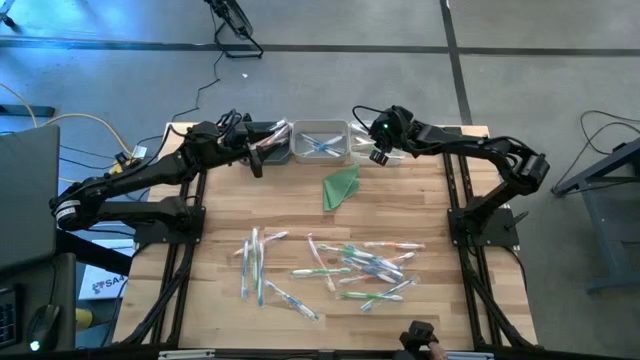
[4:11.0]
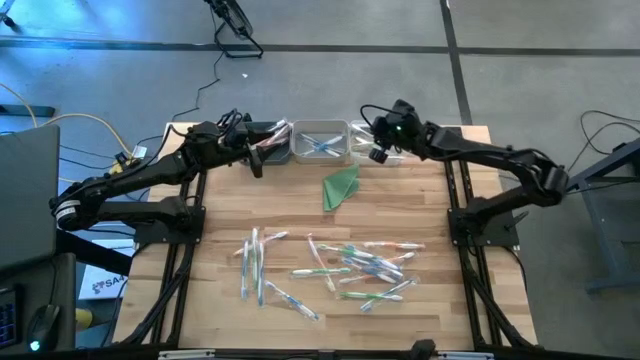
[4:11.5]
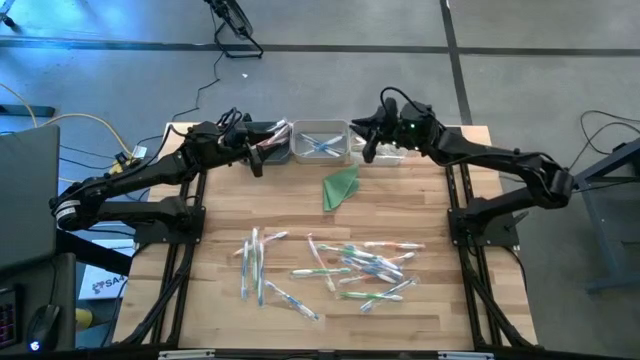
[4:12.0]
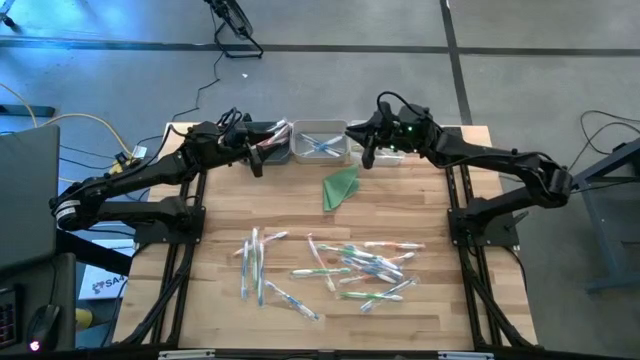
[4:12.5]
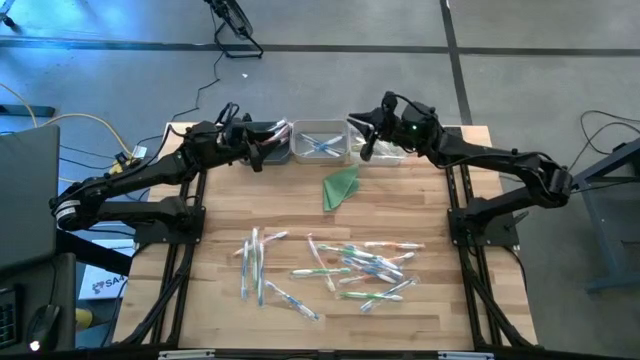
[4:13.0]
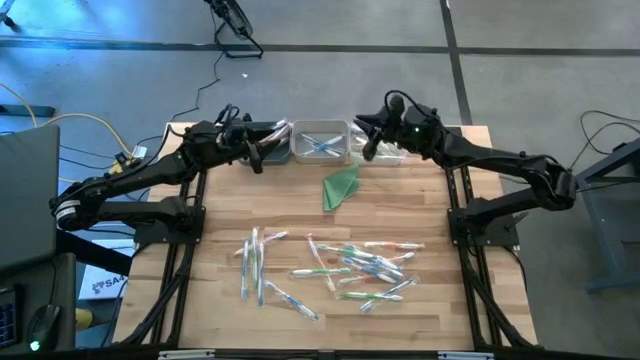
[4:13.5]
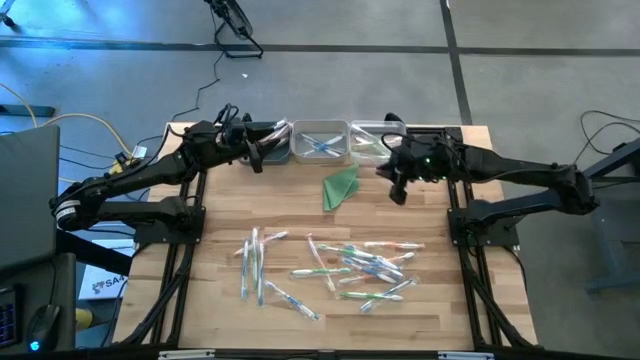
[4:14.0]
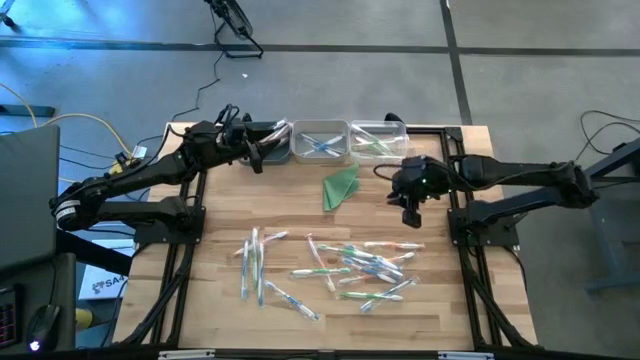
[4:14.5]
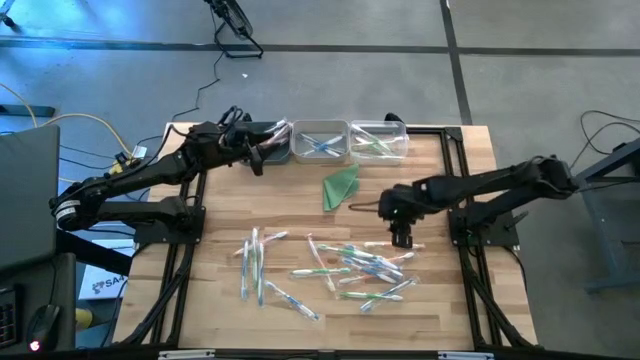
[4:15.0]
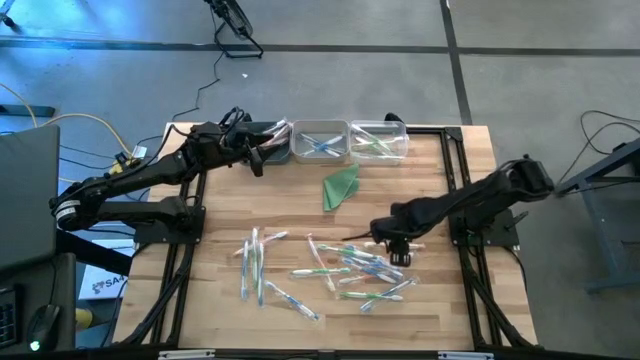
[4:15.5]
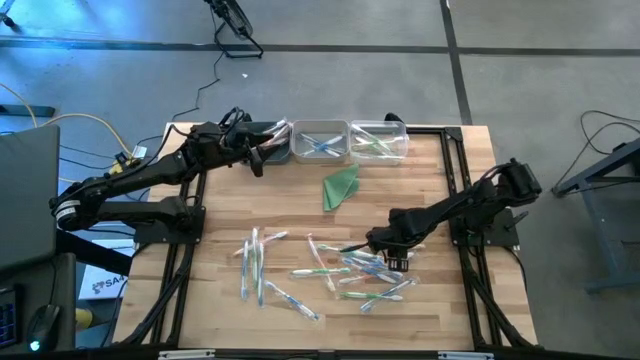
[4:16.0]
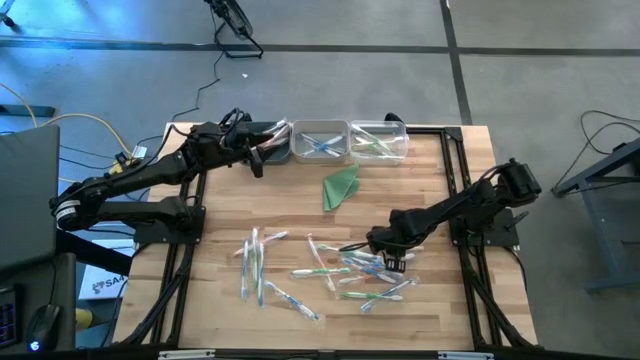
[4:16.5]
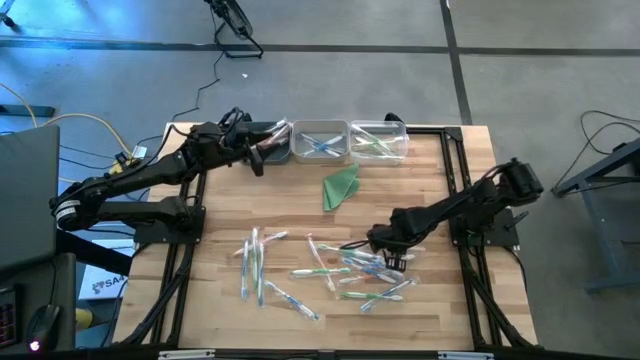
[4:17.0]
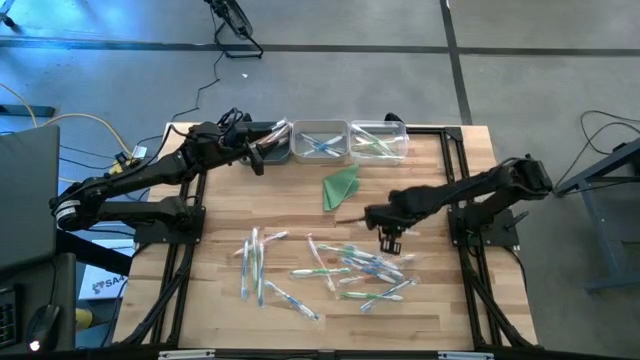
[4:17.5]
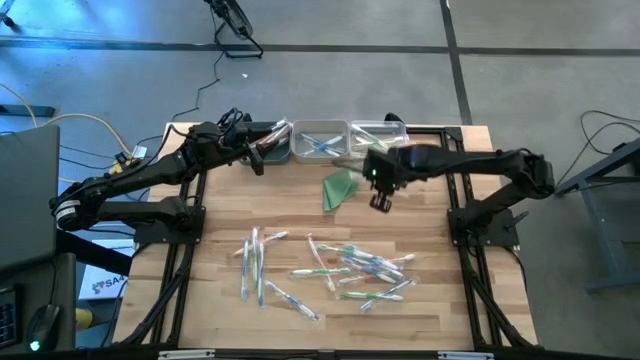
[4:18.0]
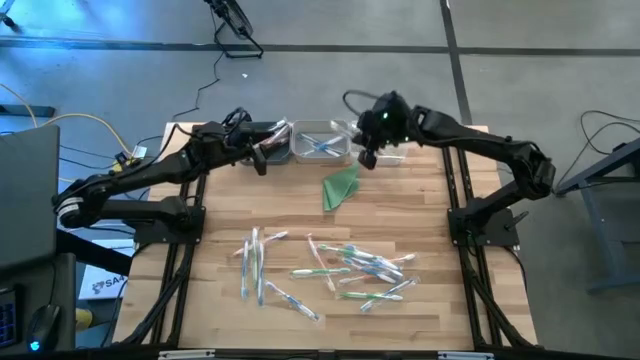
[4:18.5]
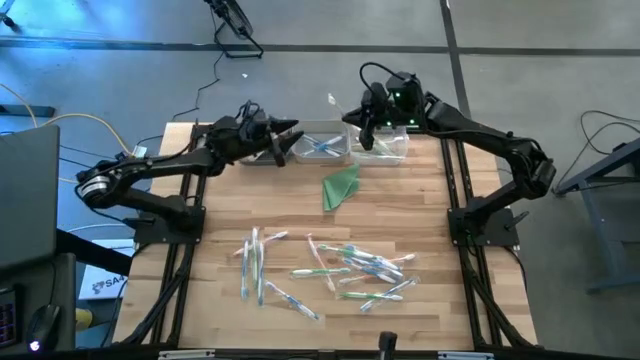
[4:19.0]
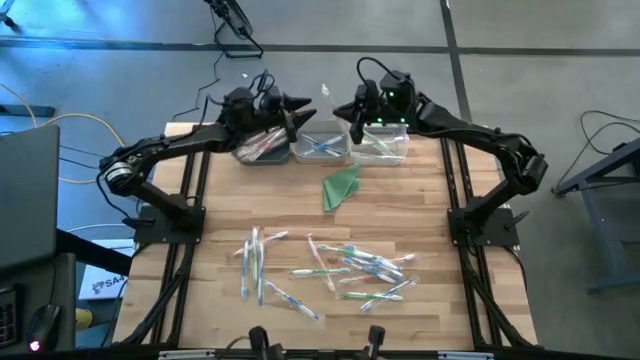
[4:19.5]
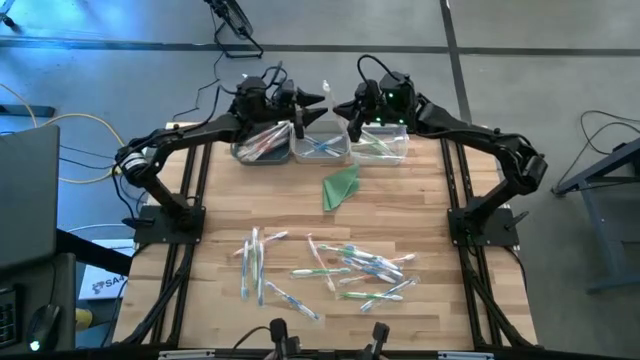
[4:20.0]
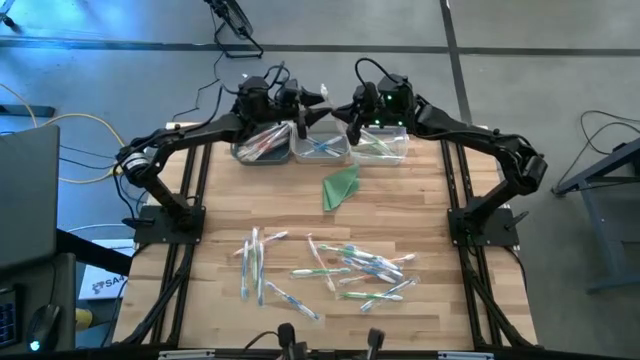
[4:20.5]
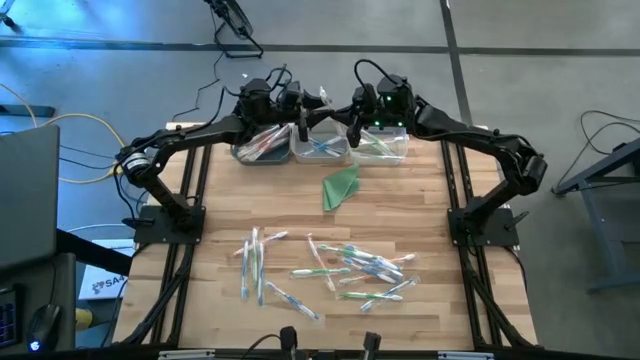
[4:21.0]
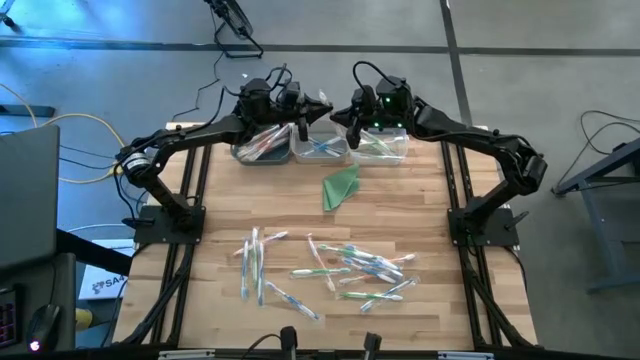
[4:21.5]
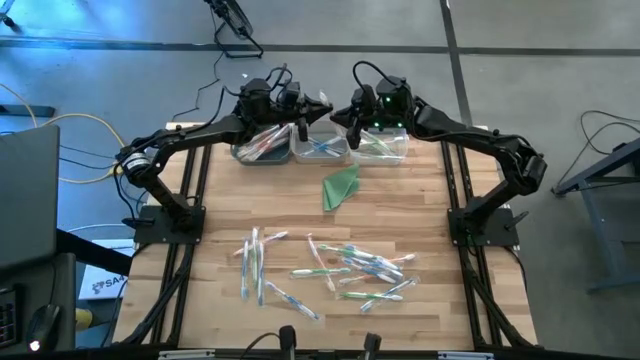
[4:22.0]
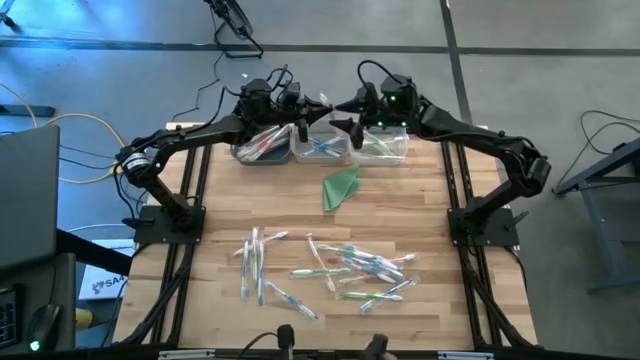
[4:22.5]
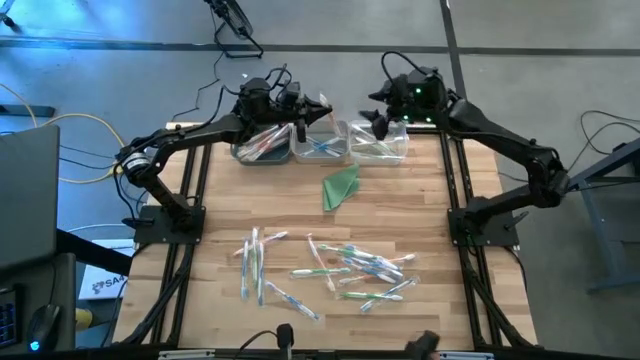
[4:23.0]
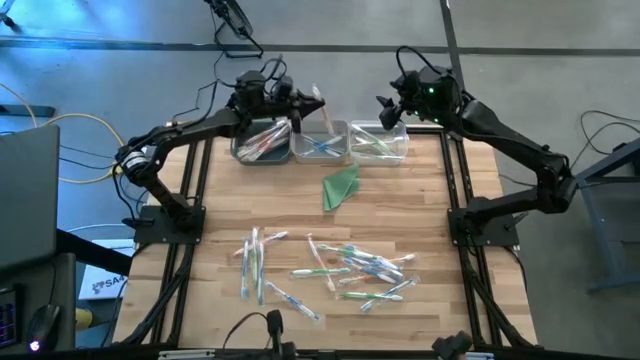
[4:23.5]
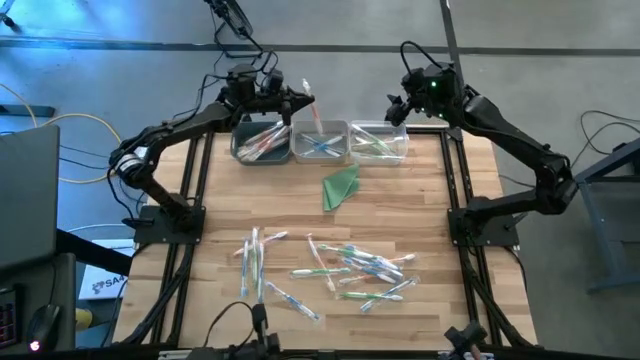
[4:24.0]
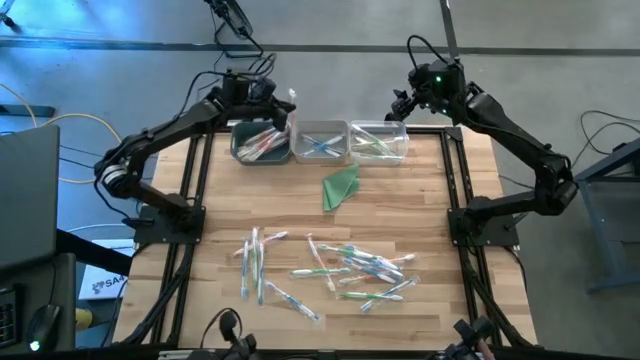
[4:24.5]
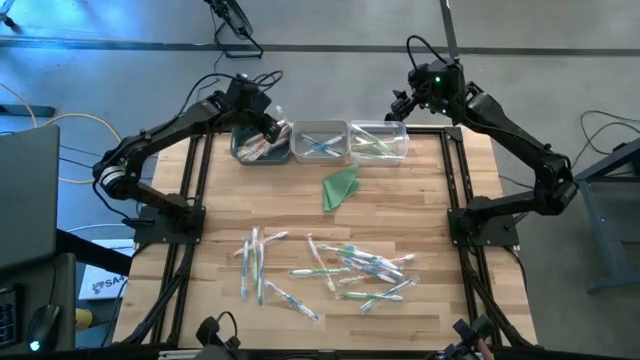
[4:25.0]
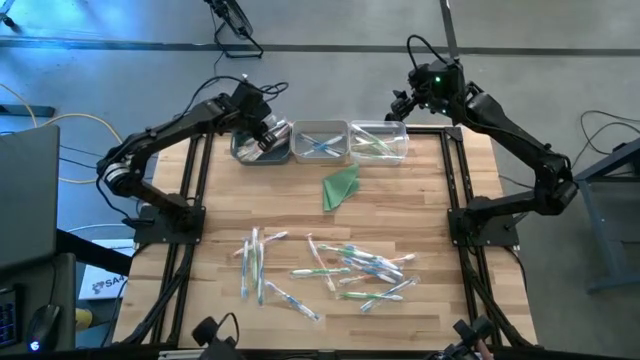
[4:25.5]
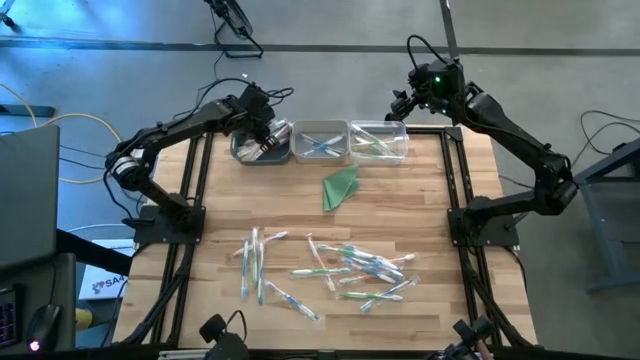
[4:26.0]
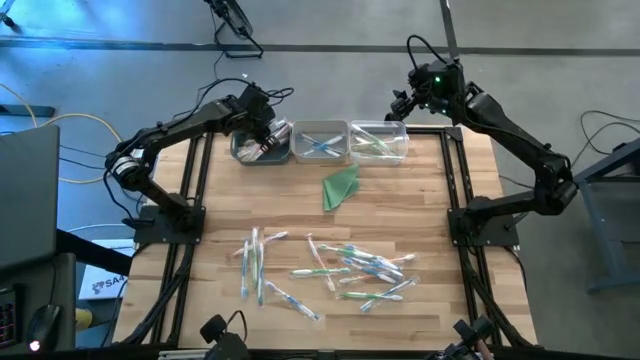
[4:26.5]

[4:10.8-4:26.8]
Task: Pick & Place Toothbrushes
Put the orange toothbrush into the dark blue bin

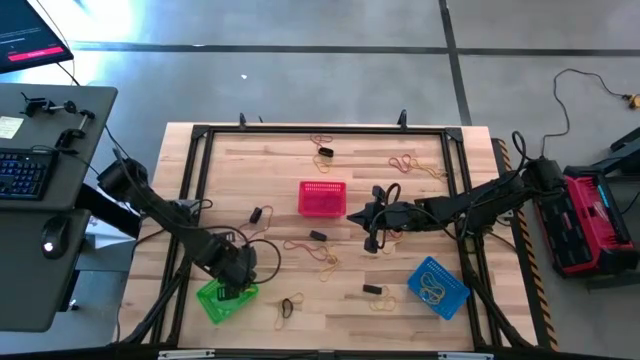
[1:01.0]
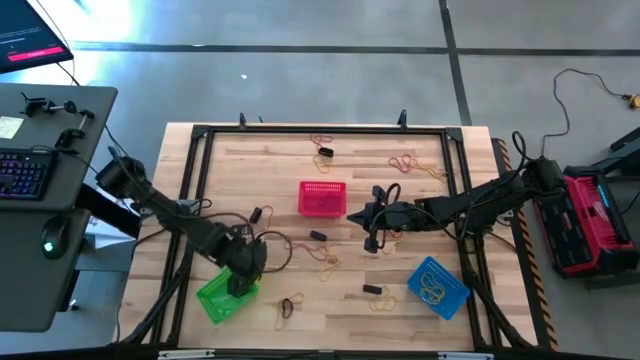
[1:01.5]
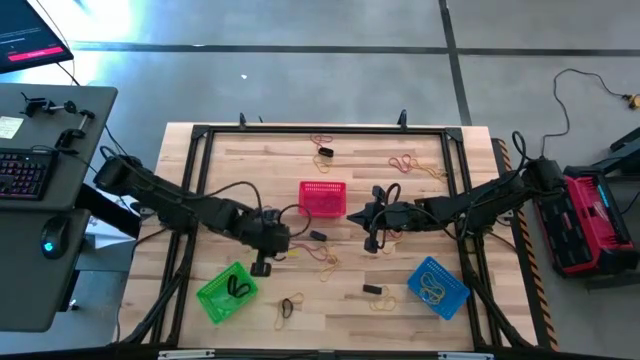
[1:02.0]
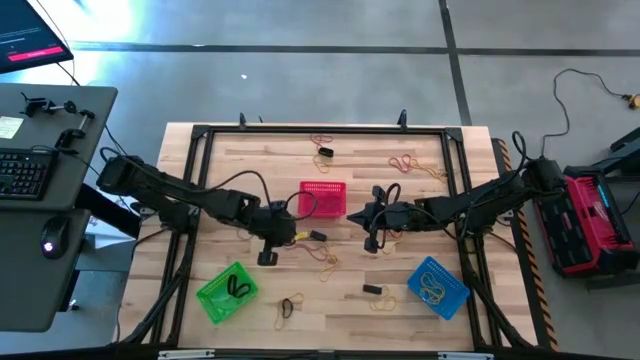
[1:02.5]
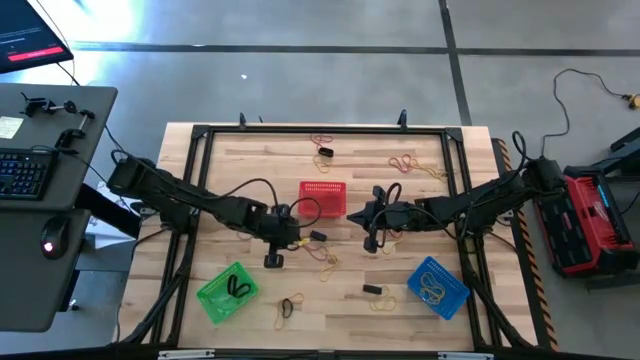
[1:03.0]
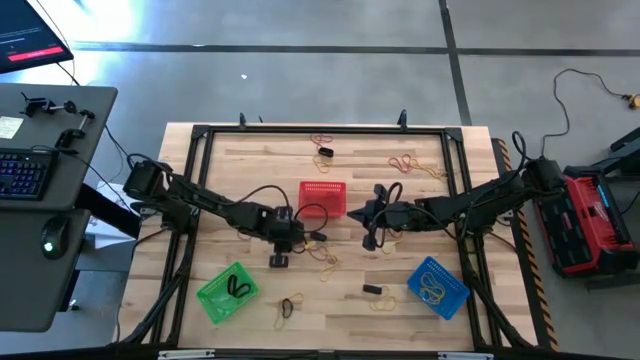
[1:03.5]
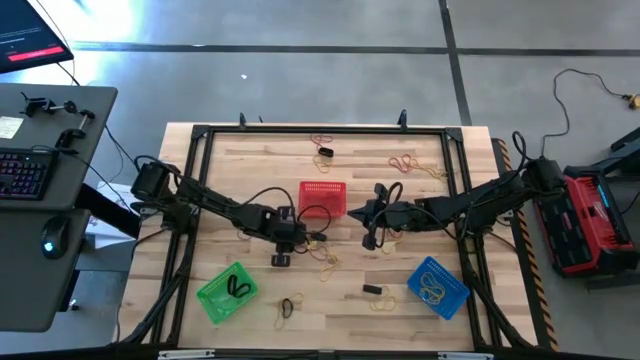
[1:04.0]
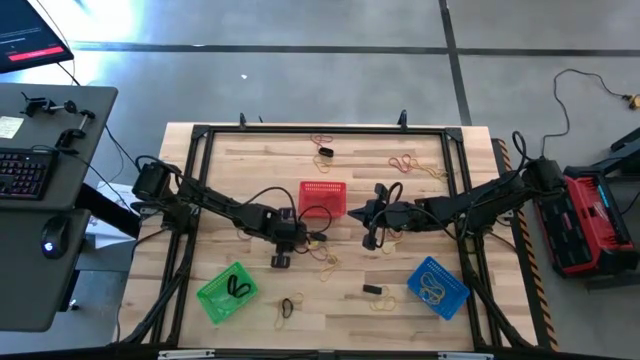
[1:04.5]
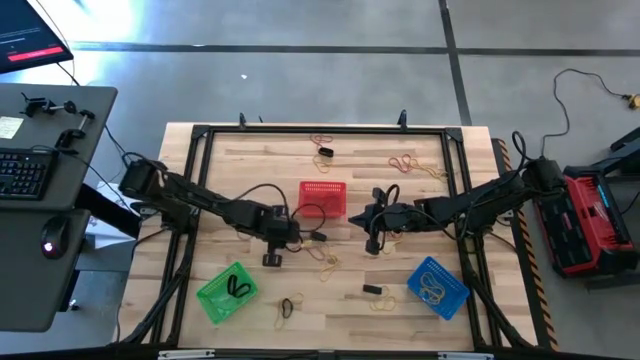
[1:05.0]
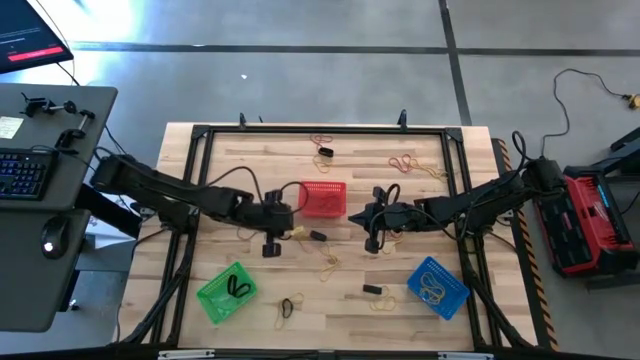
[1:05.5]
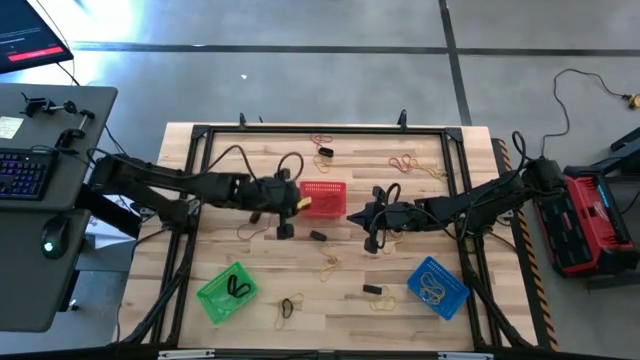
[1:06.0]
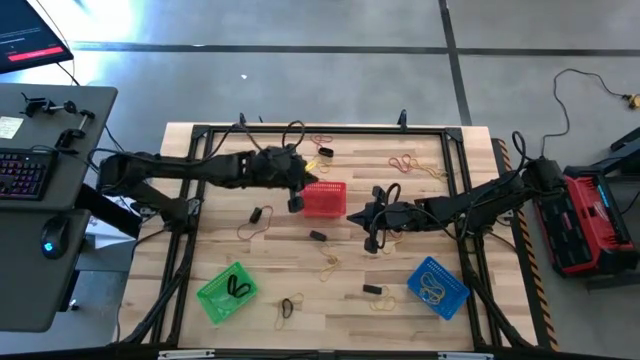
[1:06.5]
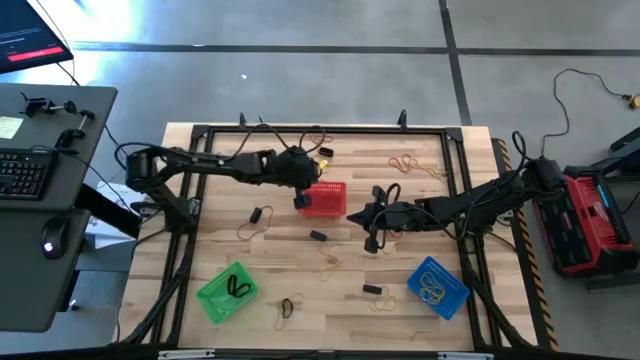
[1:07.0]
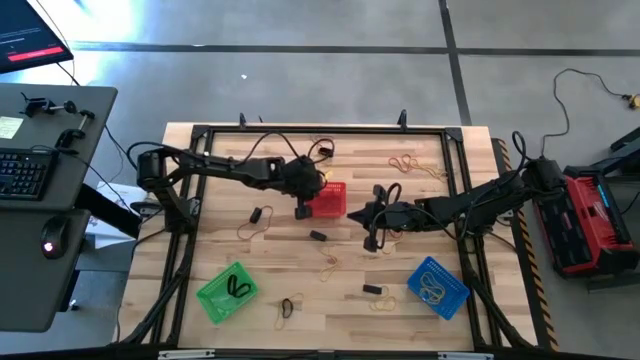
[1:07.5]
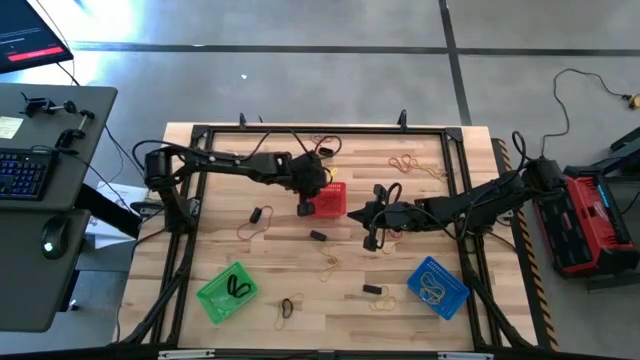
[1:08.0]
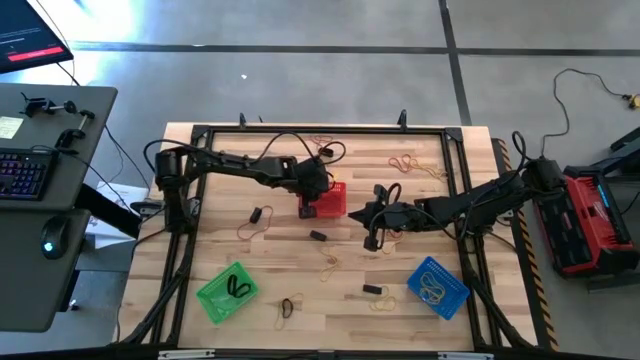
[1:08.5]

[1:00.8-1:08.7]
Task: Sort rubber bands into baskets
Put the red rubber band into the red bin
